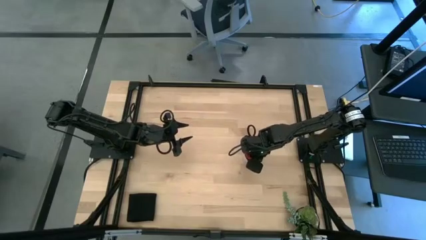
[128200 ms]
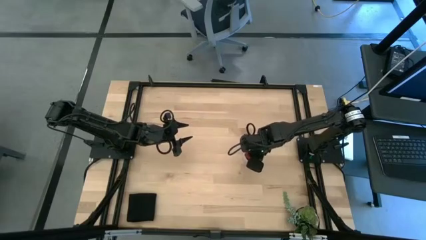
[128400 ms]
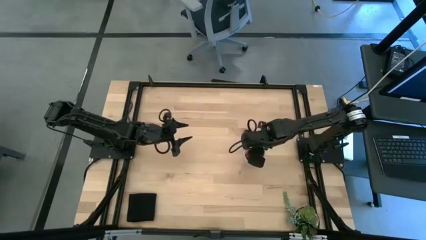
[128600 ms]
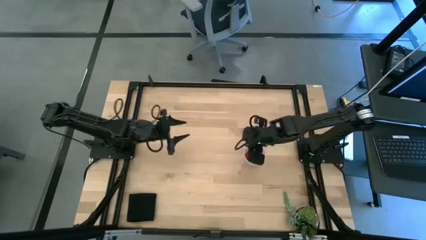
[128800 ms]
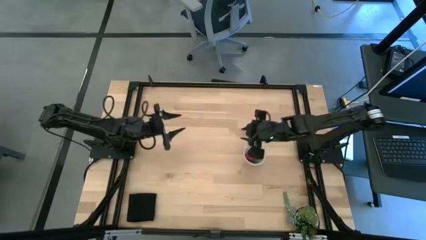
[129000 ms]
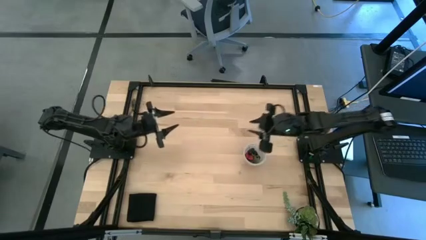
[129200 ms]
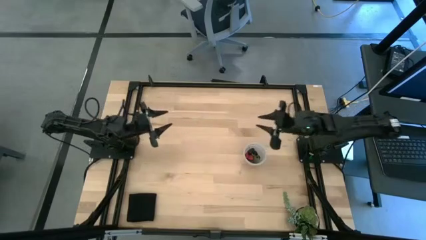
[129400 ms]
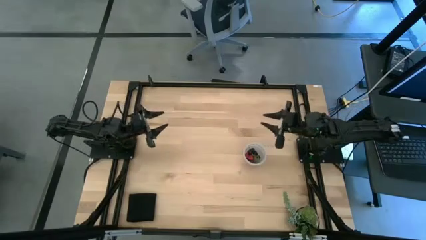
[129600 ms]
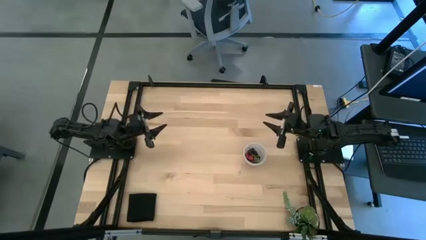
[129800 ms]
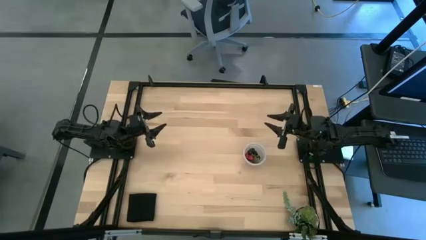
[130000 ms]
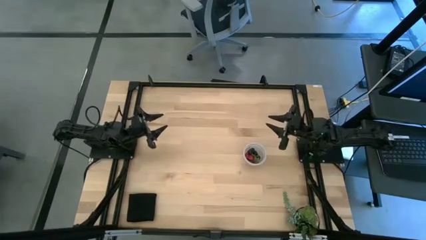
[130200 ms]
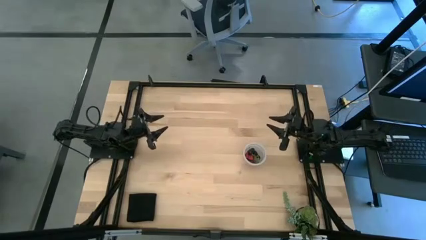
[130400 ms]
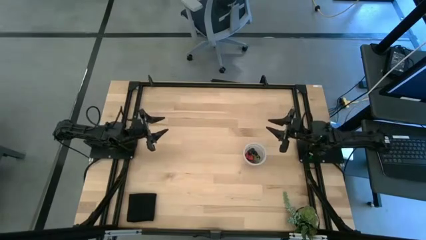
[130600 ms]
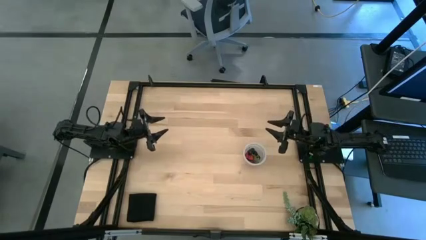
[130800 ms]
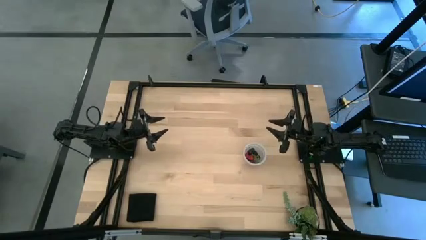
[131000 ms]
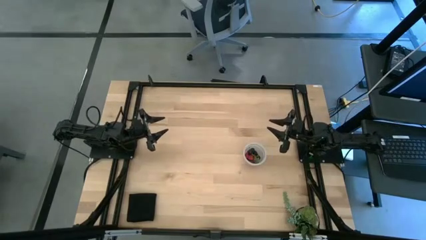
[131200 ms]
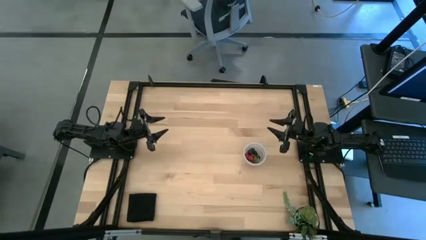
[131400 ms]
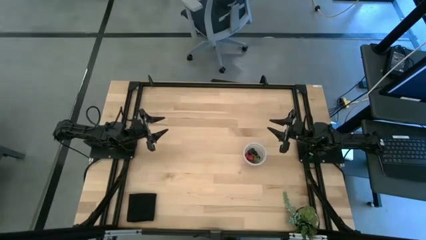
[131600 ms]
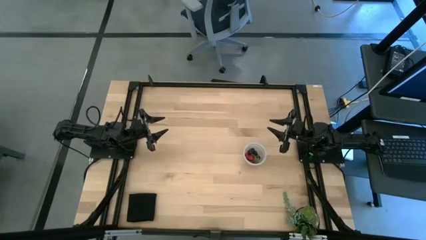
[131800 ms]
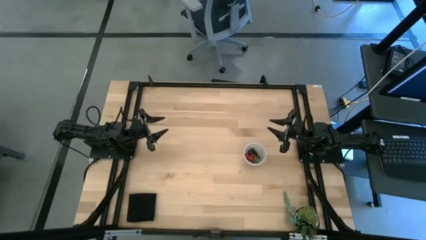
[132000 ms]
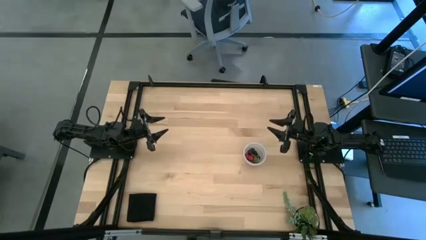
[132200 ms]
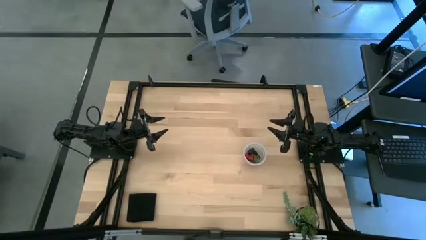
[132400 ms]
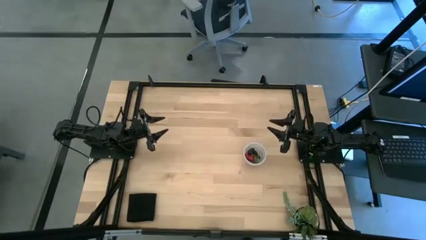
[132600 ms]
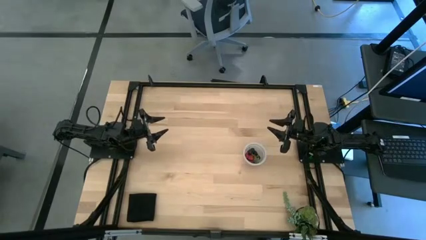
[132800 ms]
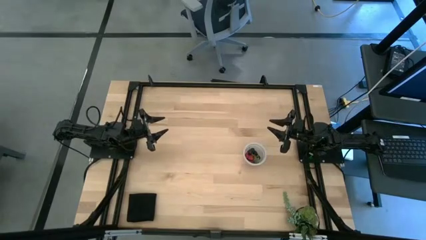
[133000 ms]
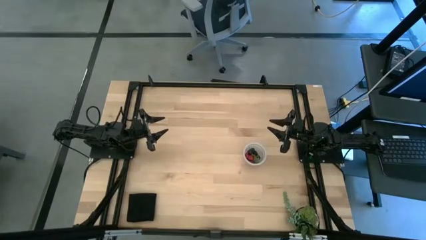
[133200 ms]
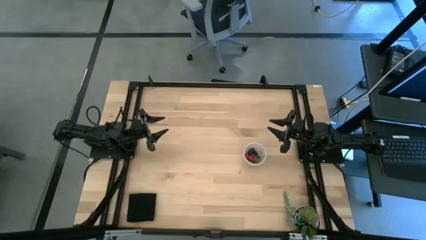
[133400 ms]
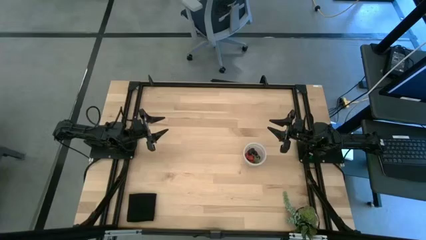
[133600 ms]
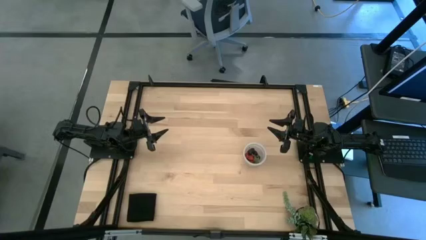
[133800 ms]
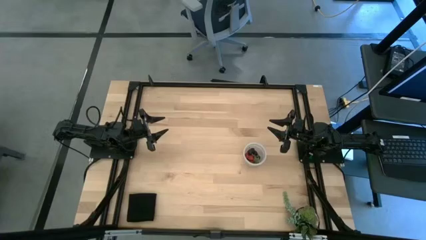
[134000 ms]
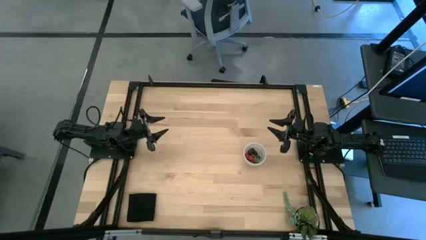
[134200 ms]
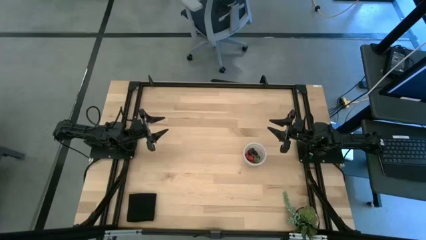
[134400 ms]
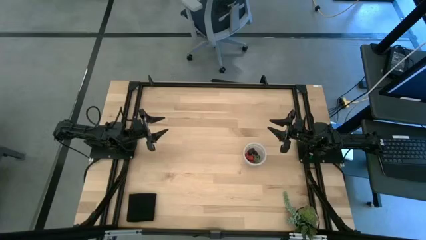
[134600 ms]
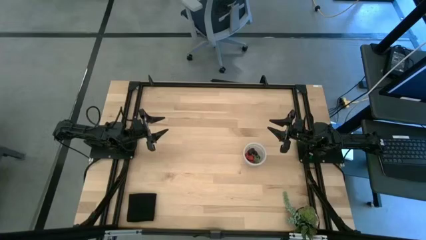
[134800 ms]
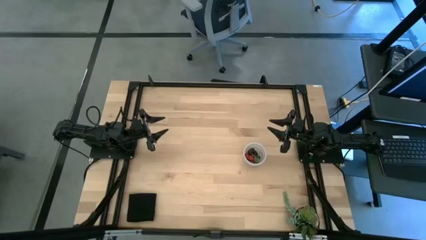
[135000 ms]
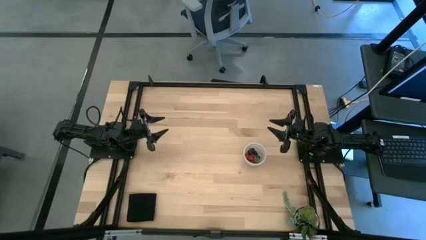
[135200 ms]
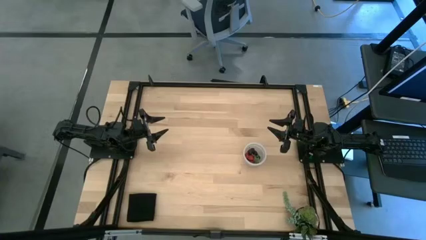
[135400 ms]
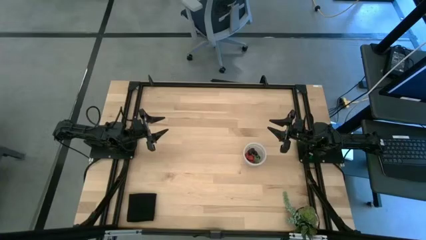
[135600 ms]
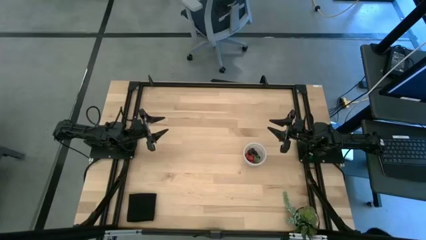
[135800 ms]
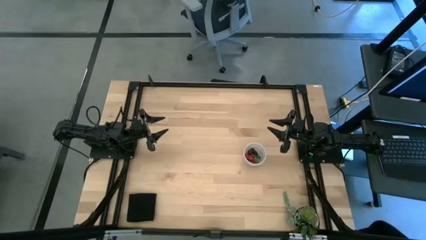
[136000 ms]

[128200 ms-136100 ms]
Task: Pick and placing Produce into tupperware
Return to Home Position

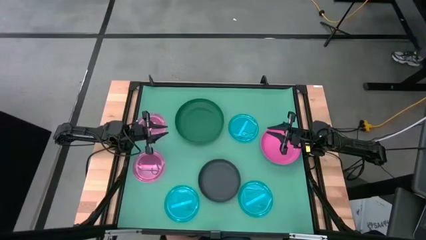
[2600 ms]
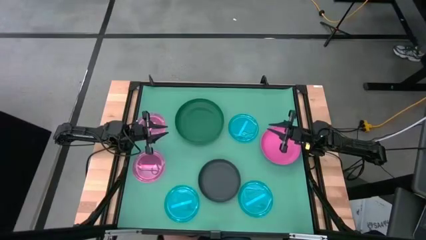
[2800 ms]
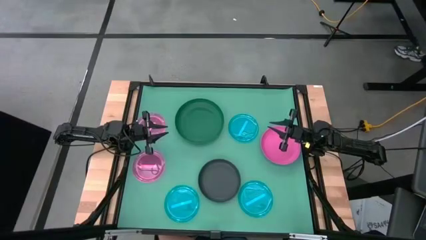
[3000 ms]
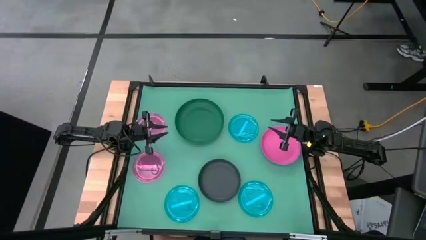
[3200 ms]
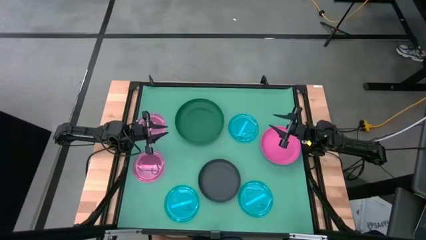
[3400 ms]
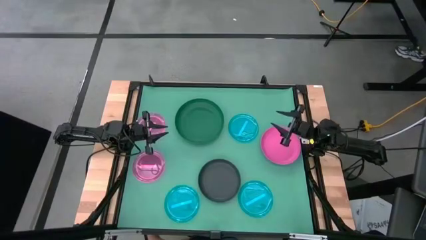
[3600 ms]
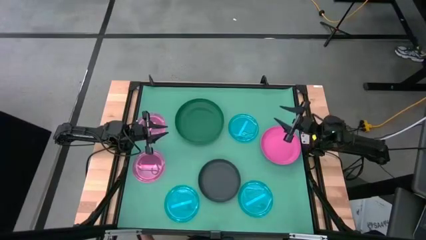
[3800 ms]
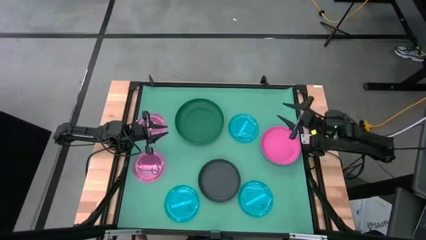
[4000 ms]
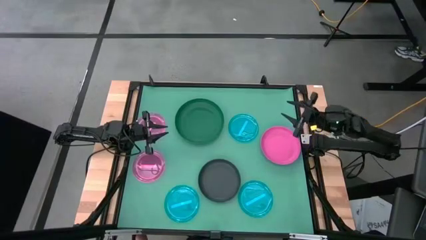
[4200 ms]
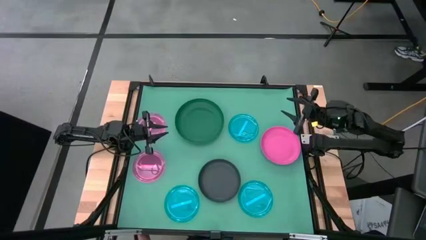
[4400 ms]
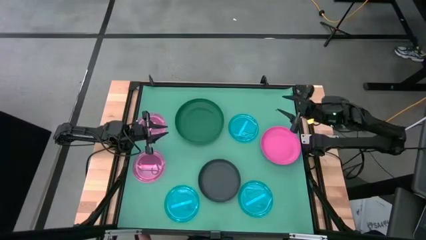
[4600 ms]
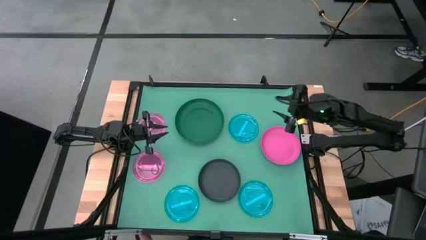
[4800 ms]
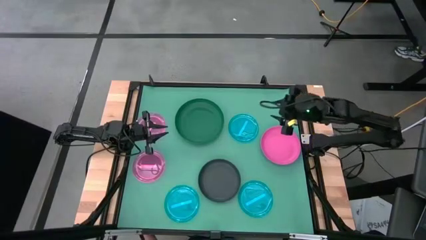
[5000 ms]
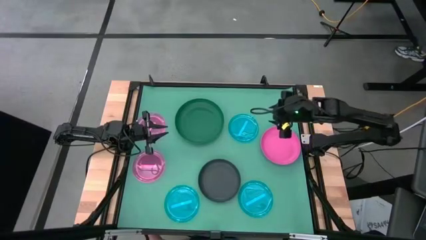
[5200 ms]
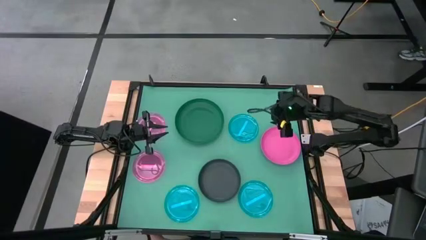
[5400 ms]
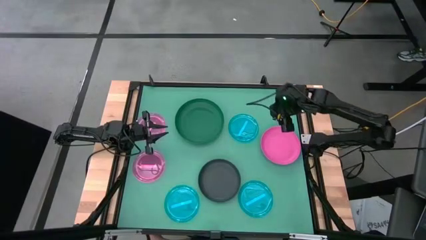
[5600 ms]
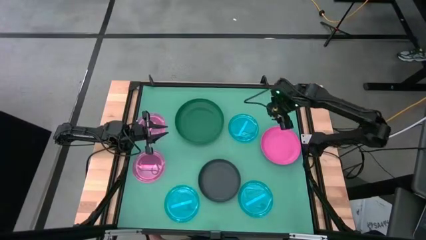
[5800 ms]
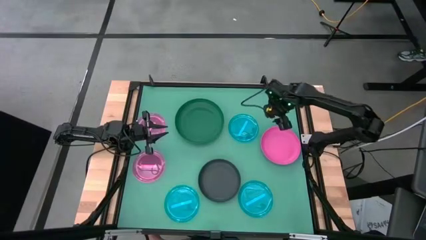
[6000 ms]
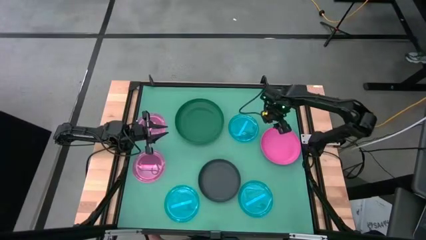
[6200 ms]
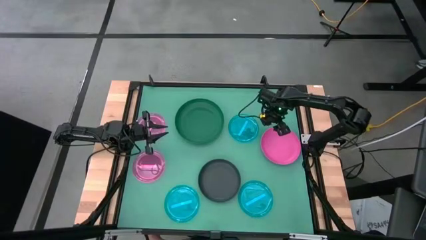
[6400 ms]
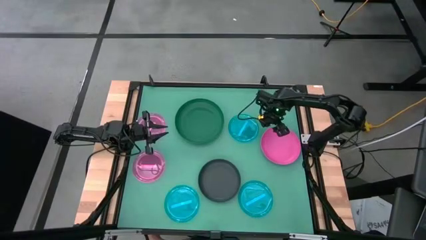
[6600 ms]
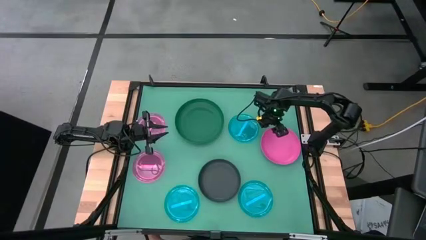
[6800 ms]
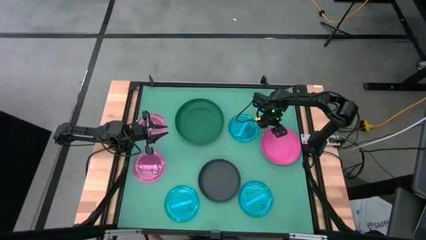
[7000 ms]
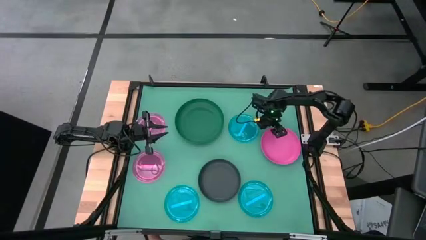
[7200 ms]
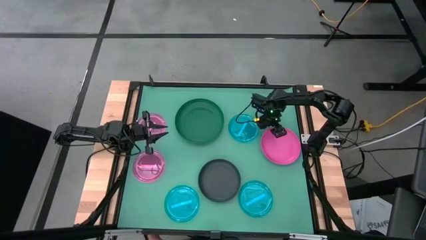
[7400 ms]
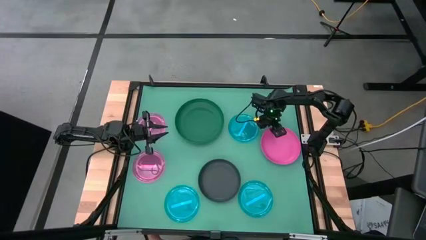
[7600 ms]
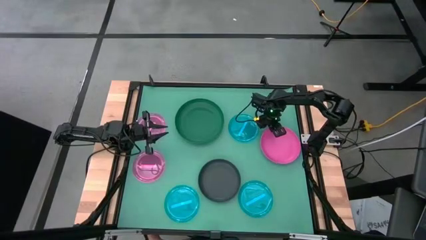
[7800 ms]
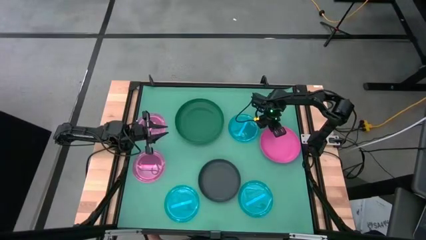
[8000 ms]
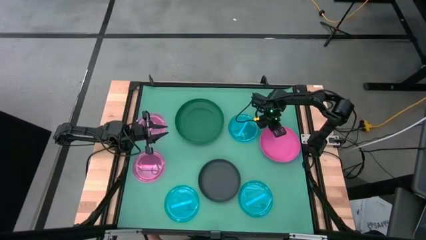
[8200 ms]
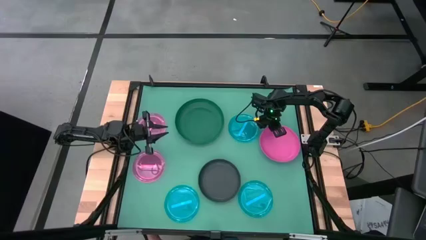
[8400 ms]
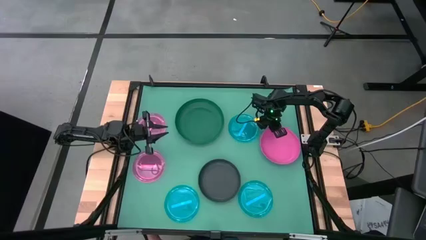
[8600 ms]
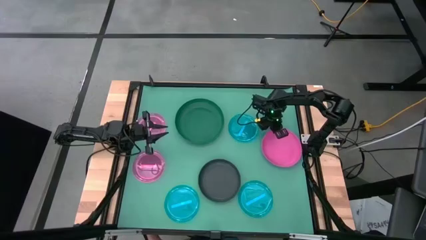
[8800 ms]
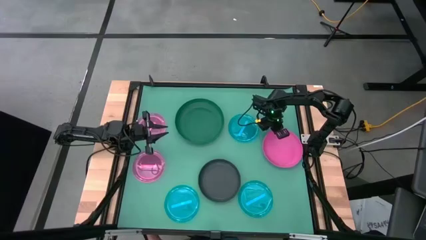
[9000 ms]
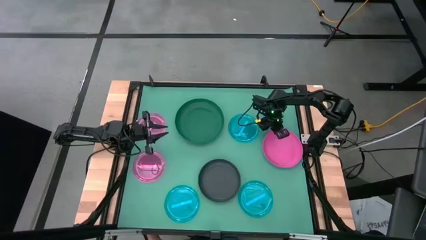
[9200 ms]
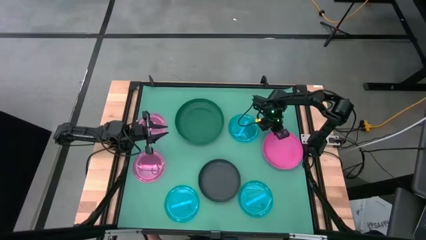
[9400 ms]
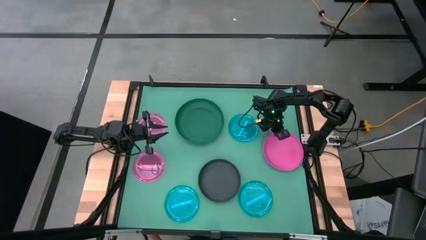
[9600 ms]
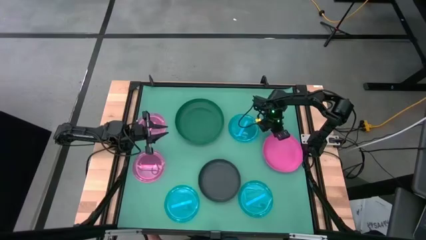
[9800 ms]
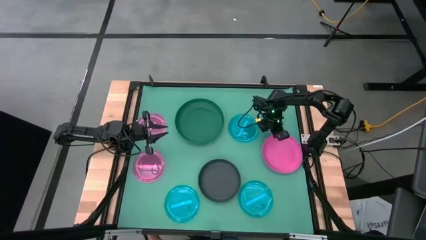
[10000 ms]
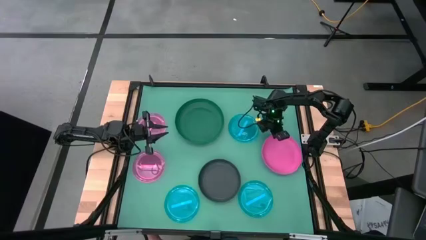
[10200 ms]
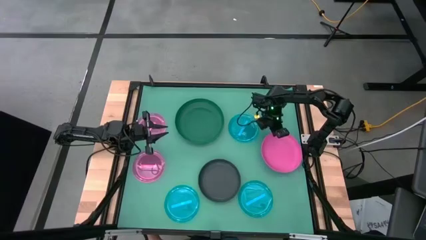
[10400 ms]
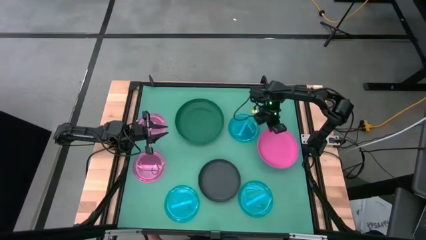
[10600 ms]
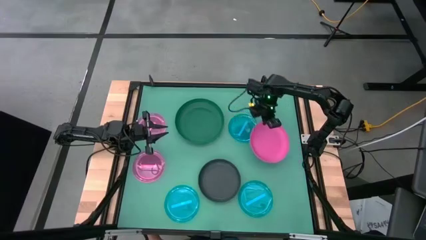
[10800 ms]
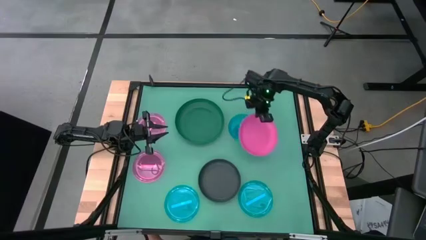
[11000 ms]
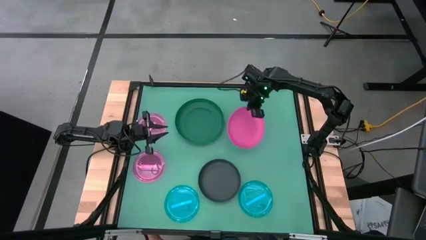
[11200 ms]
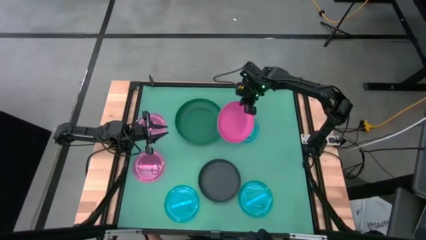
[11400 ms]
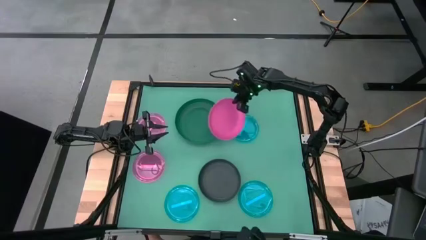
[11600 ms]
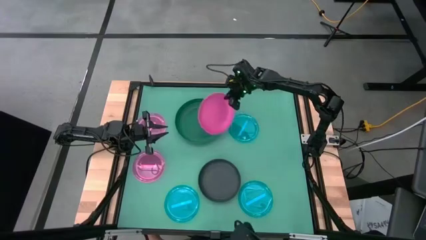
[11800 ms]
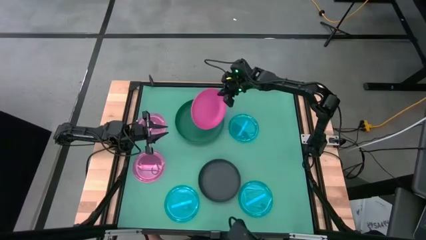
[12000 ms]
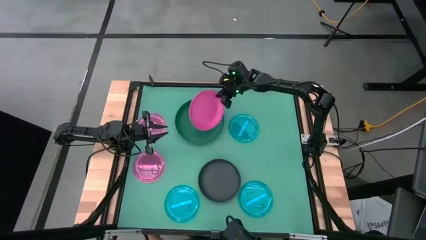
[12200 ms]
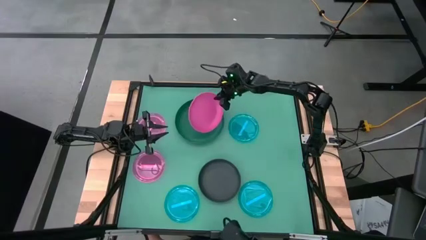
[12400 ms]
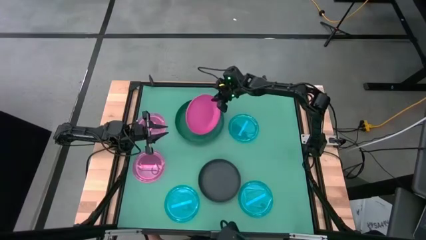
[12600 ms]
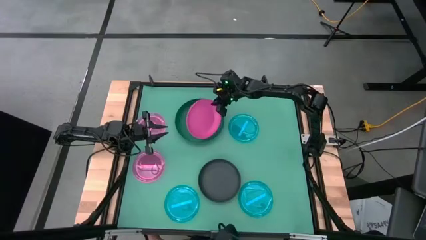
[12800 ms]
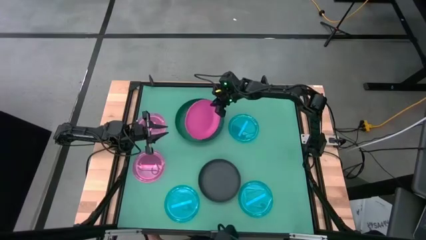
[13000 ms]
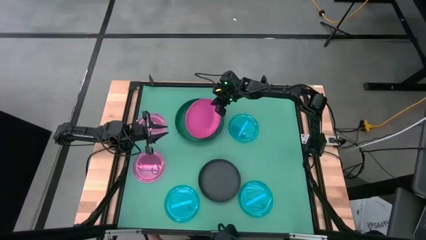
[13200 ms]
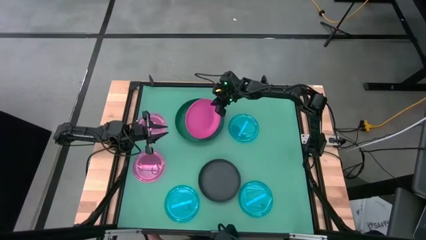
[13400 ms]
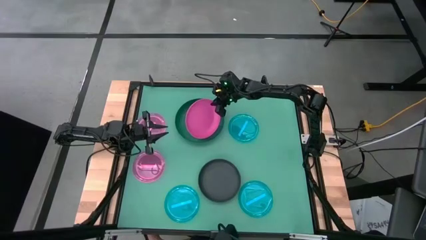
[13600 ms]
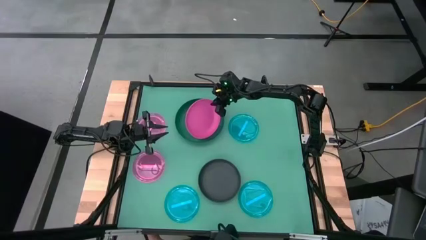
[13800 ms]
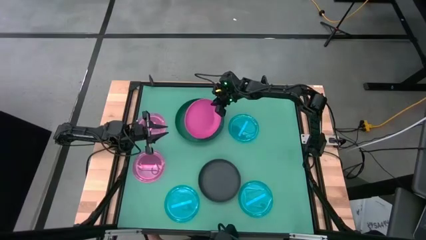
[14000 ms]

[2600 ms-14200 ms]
Task: Stack plastic plates
Stack the pink plate on top of the green plate
